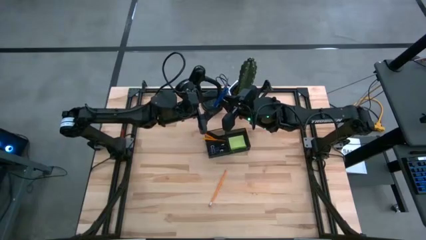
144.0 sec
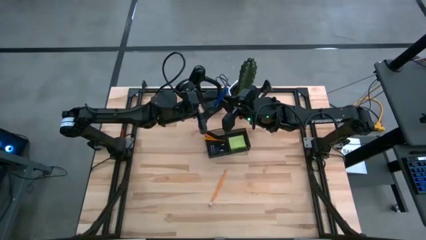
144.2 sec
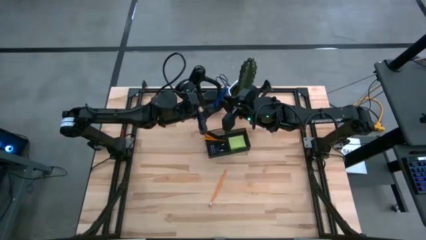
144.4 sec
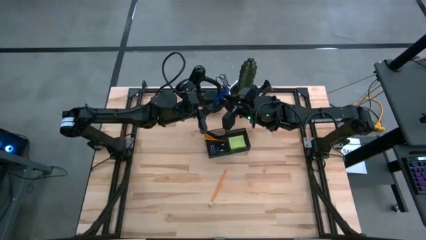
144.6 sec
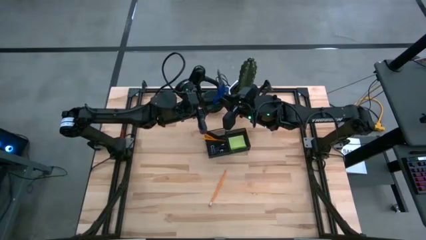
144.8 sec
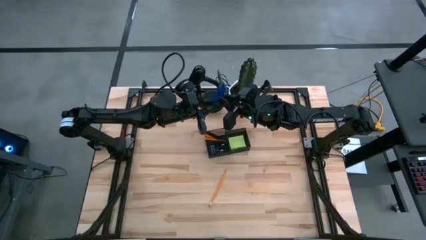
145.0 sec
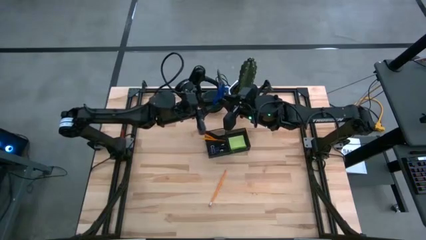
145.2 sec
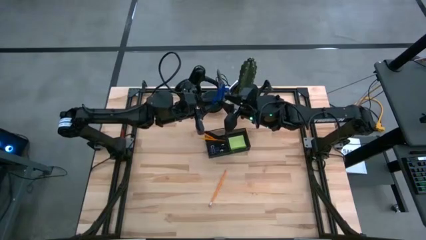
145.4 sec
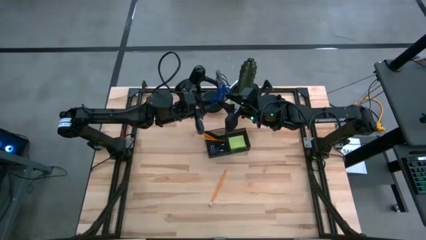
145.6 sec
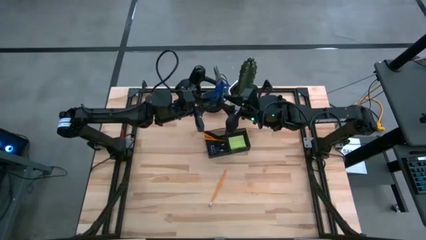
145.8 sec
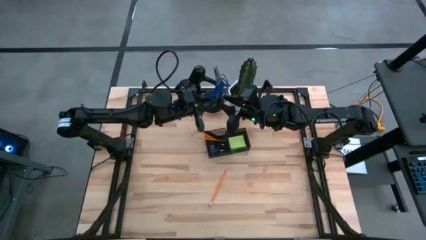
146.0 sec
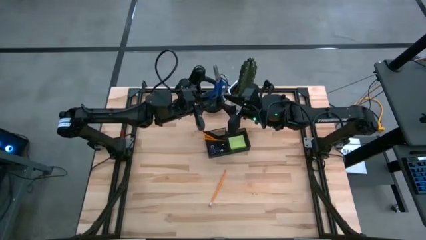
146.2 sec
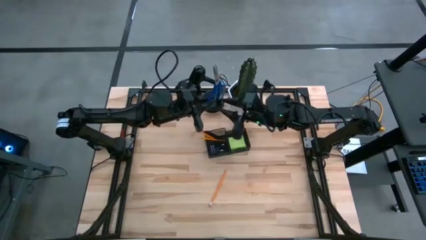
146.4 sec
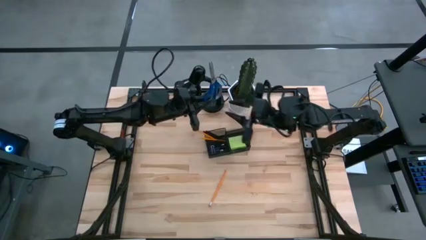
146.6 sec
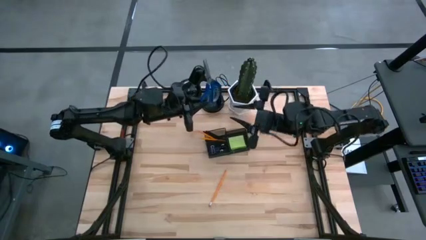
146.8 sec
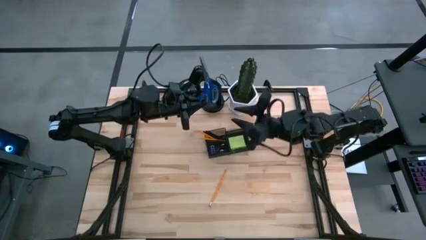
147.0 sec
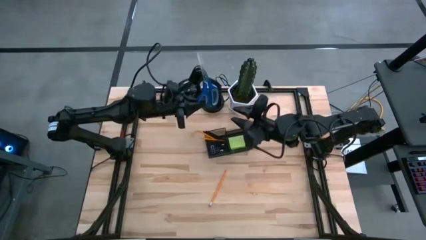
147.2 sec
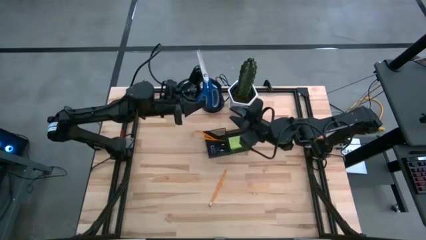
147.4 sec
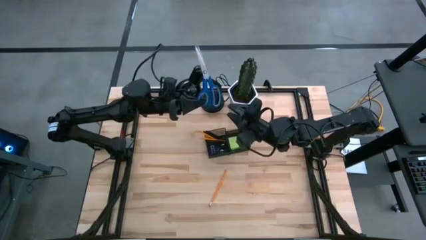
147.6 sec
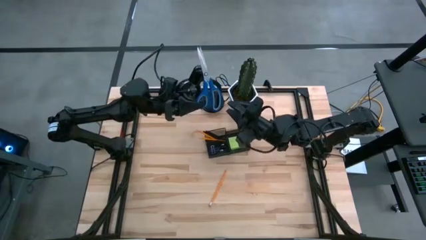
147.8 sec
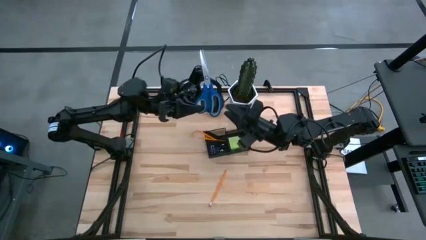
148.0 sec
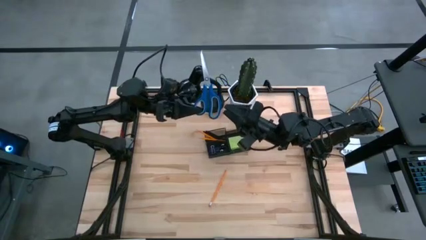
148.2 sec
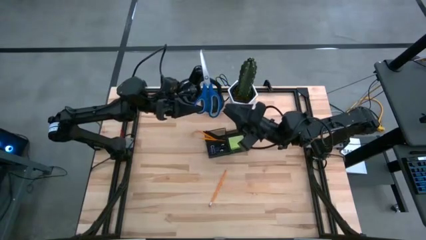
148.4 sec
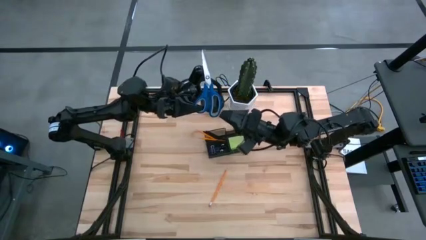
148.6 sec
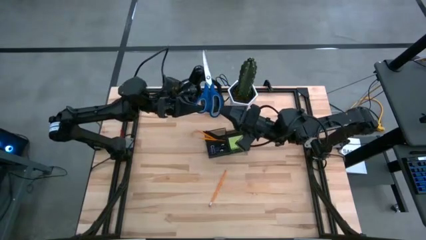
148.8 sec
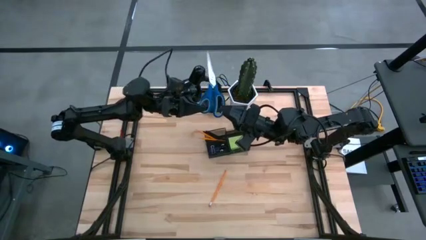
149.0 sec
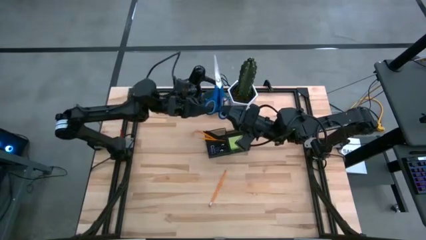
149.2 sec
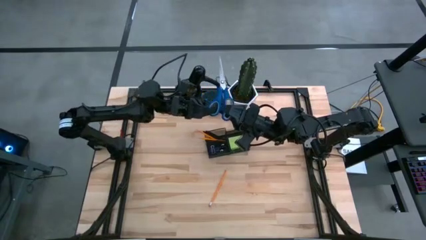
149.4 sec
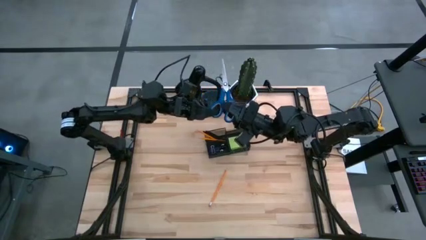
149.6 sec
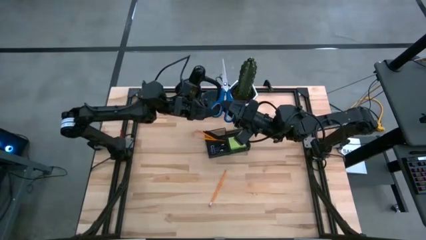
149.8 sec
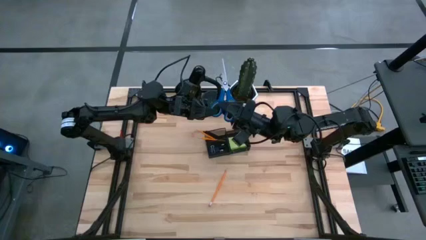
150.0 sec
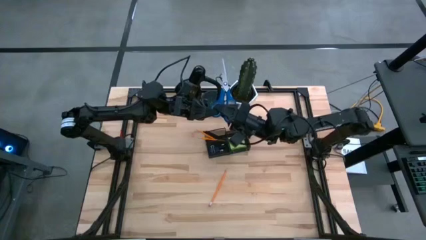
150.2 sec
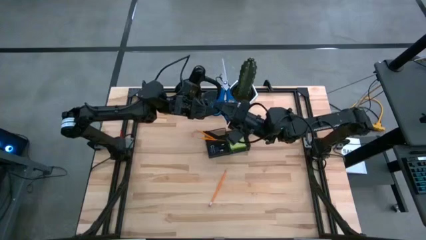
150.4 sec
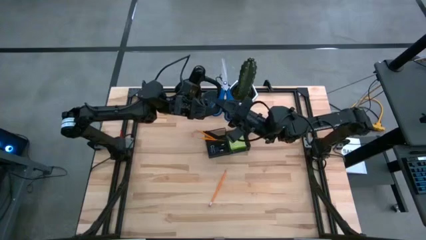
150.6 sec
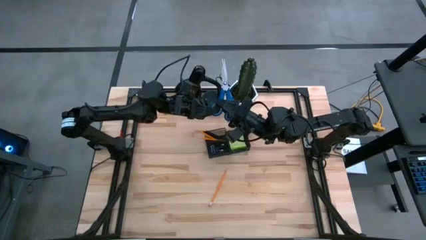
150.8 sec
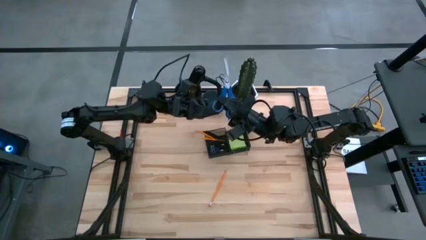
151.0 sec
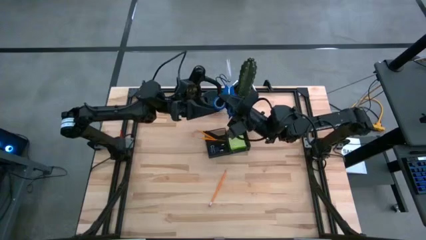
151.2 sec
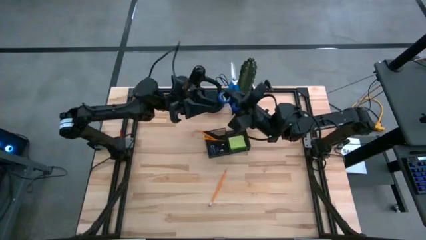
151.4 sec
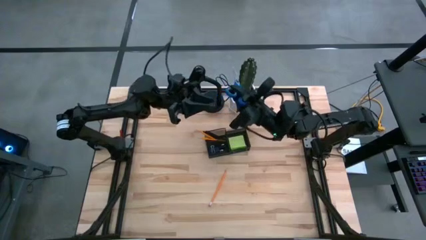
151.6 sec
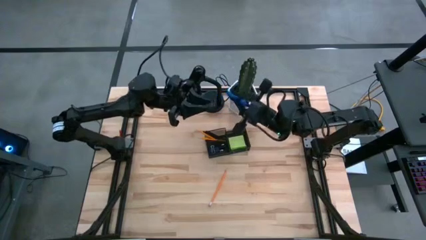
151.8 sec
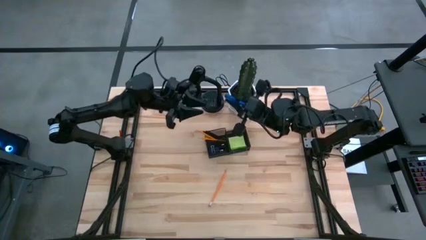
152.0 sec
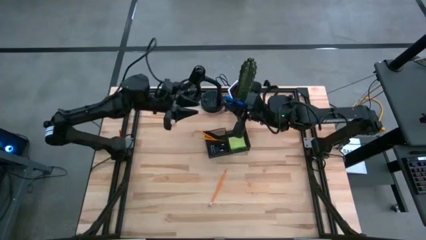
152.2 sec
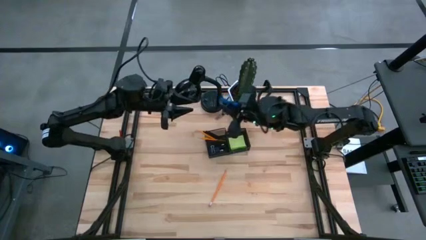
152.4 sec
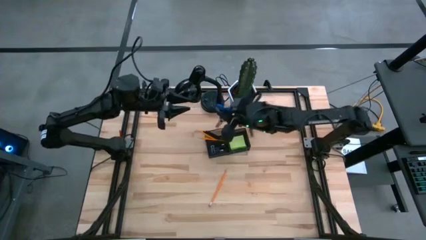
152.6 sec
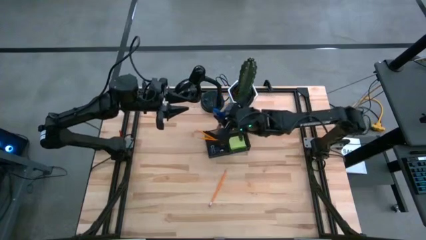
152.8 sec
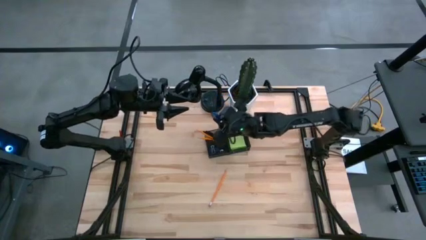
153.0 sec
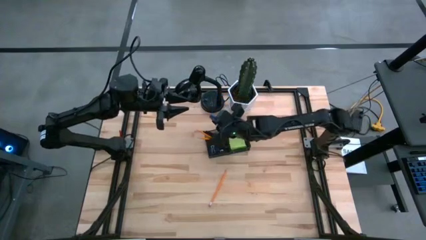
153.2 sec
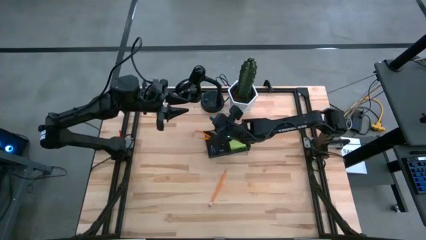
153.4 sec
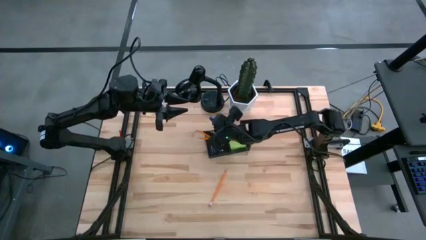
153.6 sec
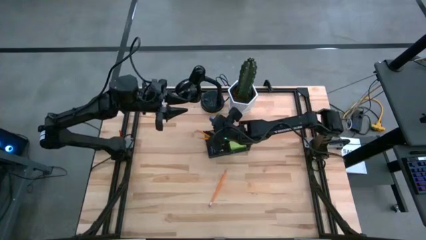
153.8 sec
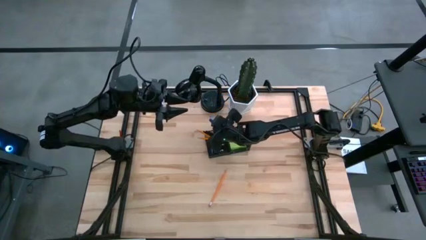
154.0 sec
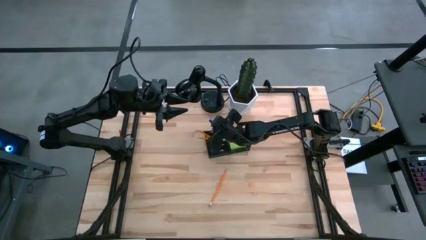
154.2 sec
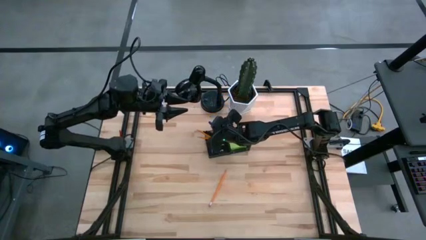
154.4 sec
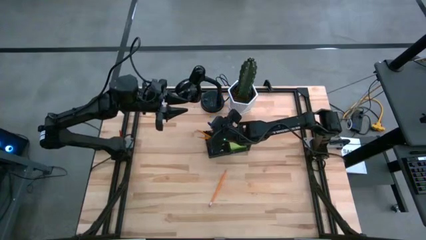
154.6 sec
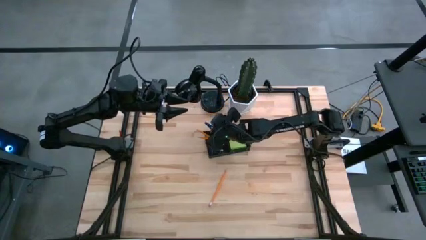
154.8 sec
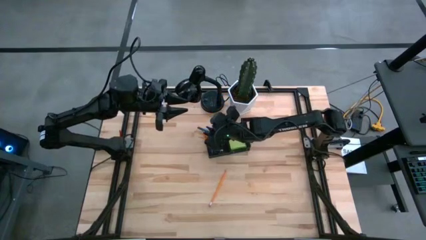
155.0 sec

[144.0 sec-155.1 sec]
Task: Pick and place office supplies into organizer
Put the blue scissors into the desk organizer
